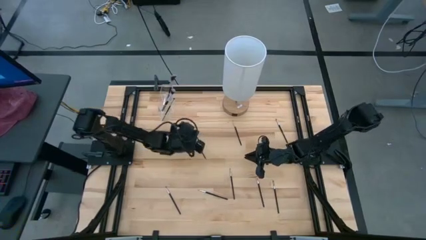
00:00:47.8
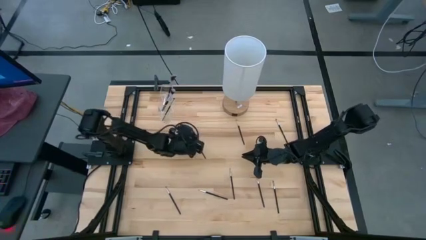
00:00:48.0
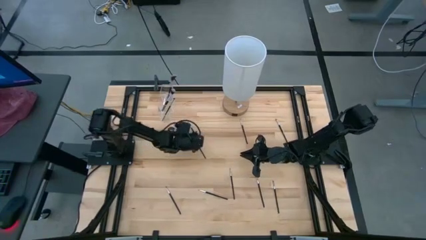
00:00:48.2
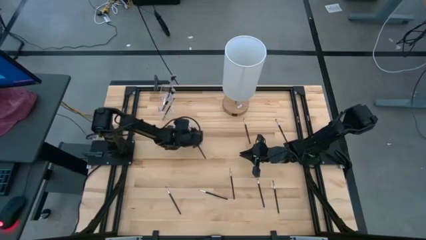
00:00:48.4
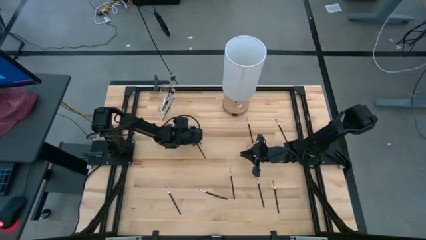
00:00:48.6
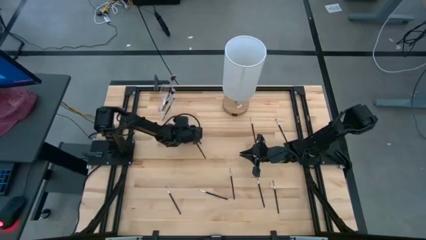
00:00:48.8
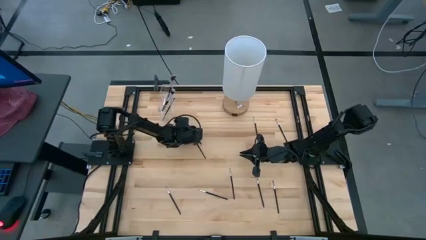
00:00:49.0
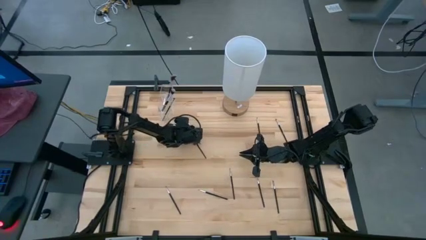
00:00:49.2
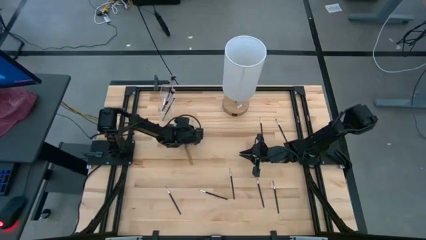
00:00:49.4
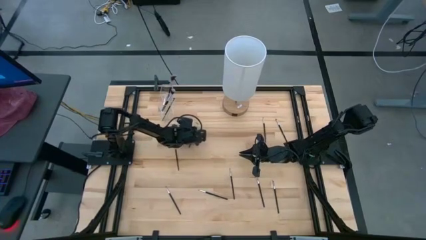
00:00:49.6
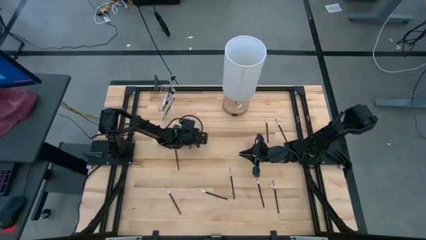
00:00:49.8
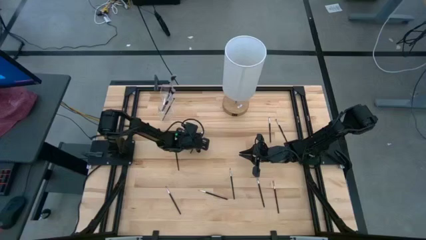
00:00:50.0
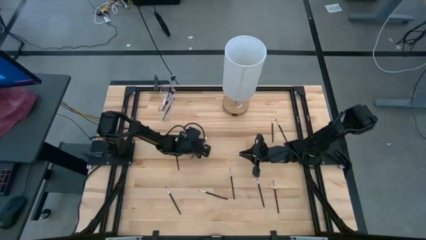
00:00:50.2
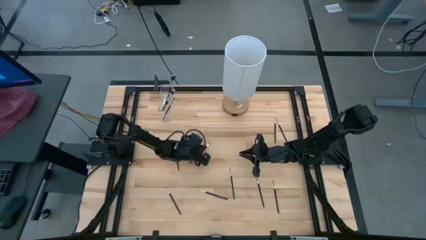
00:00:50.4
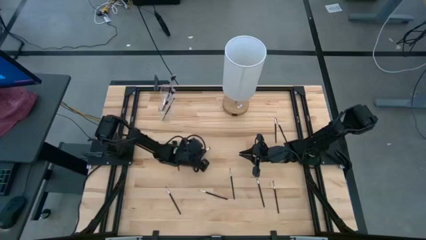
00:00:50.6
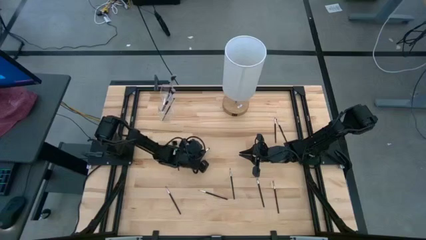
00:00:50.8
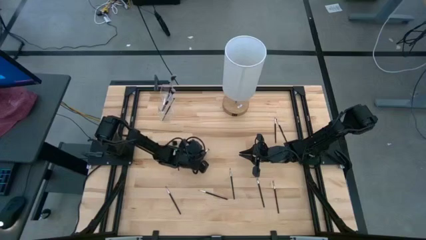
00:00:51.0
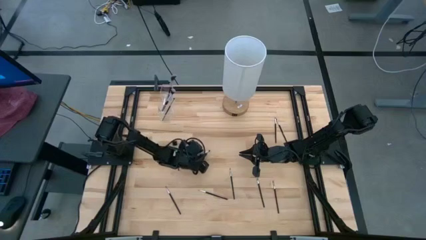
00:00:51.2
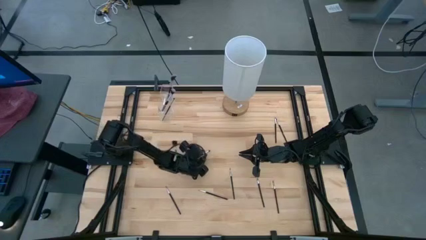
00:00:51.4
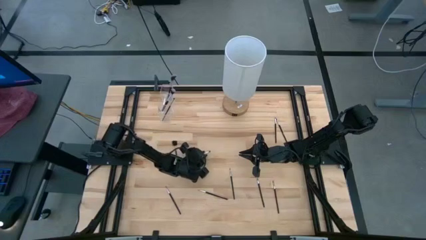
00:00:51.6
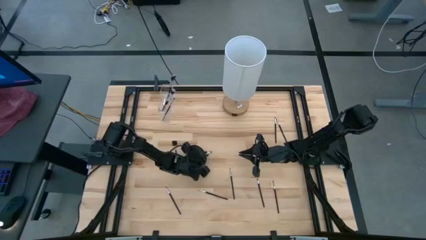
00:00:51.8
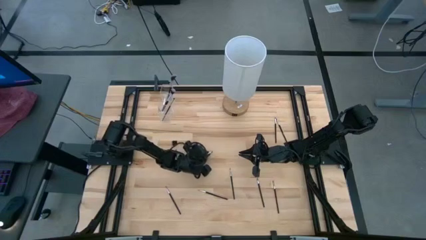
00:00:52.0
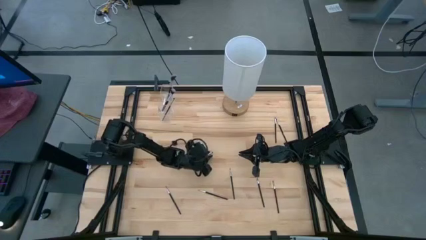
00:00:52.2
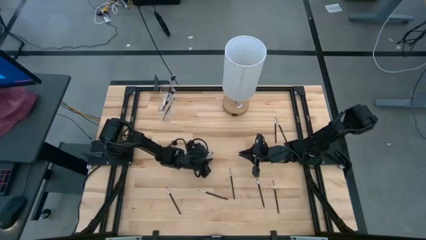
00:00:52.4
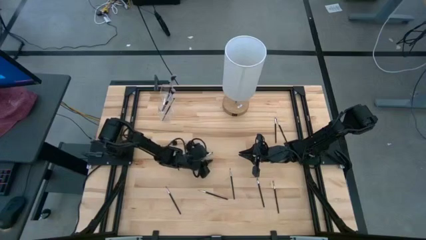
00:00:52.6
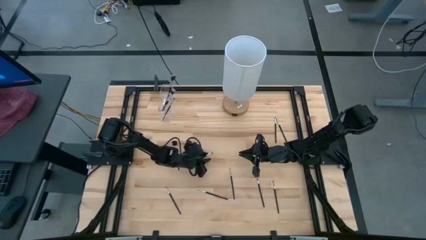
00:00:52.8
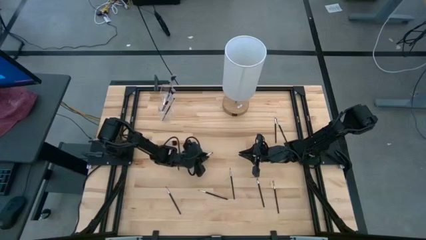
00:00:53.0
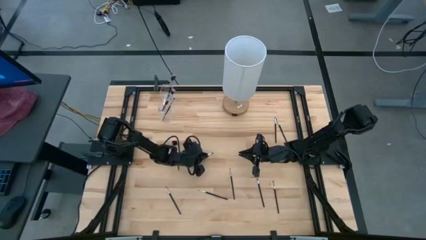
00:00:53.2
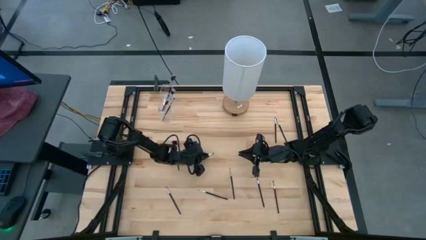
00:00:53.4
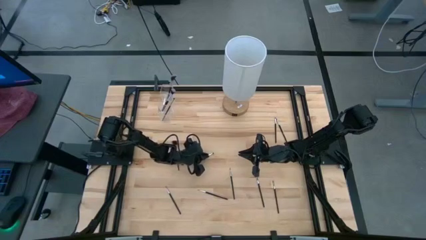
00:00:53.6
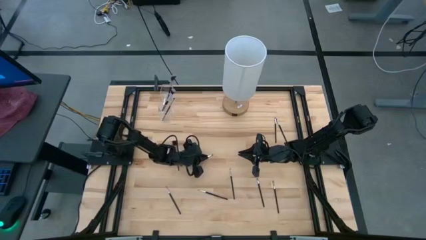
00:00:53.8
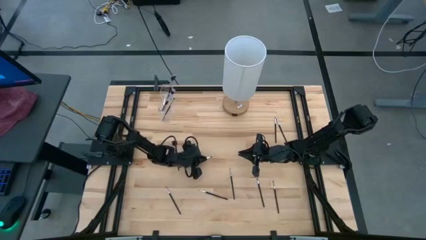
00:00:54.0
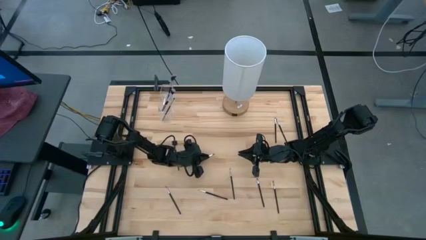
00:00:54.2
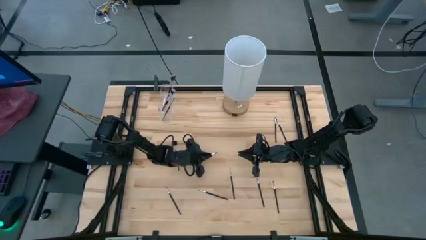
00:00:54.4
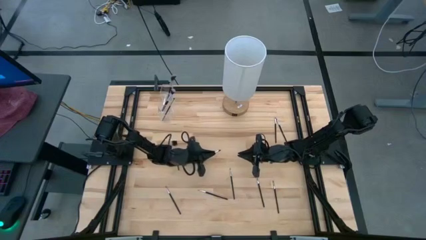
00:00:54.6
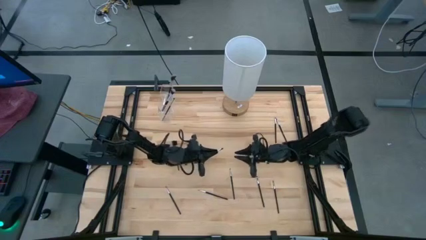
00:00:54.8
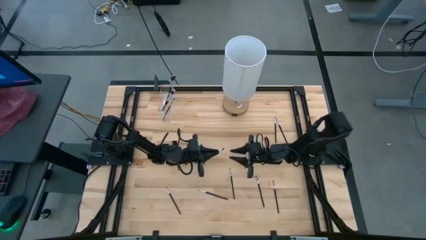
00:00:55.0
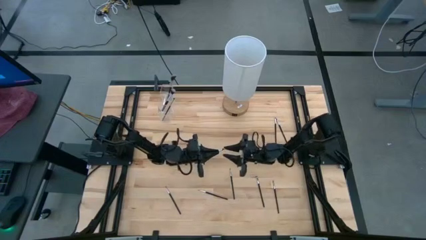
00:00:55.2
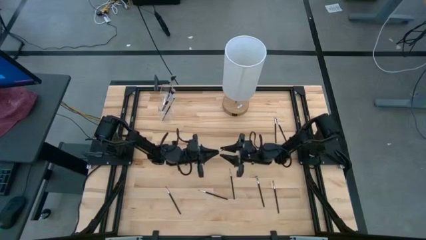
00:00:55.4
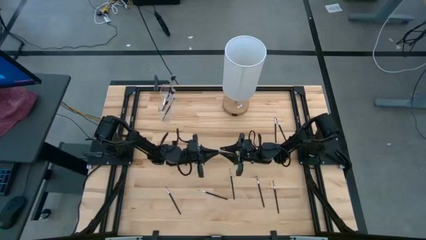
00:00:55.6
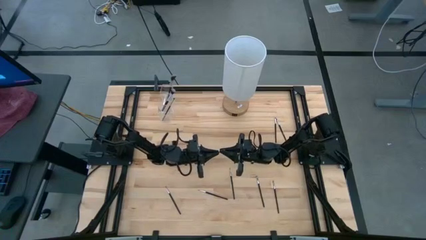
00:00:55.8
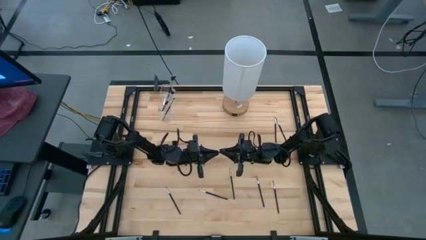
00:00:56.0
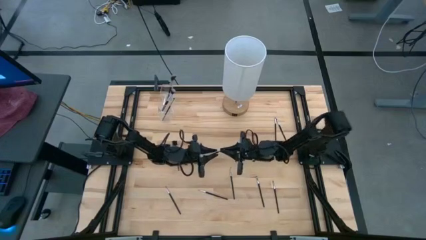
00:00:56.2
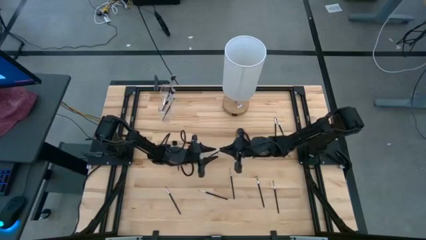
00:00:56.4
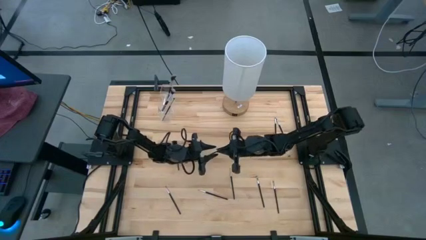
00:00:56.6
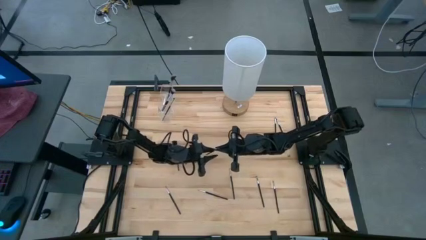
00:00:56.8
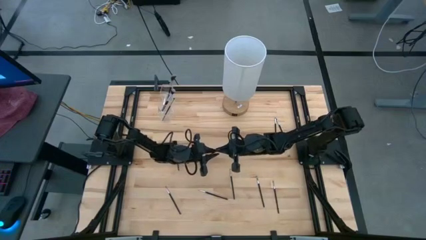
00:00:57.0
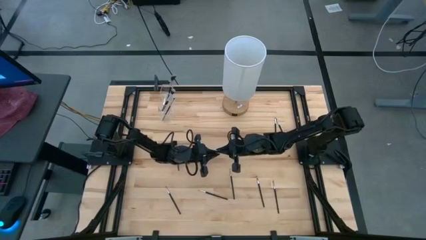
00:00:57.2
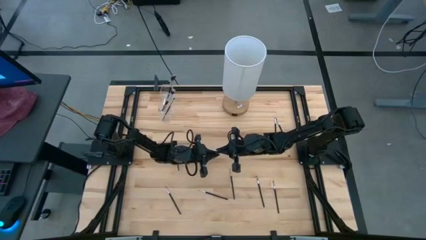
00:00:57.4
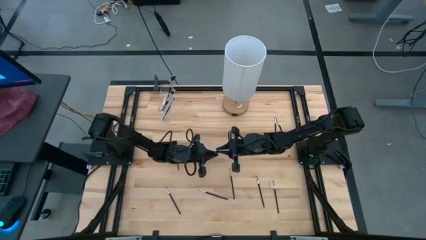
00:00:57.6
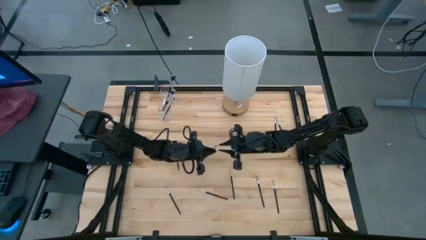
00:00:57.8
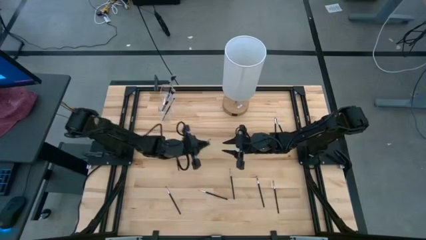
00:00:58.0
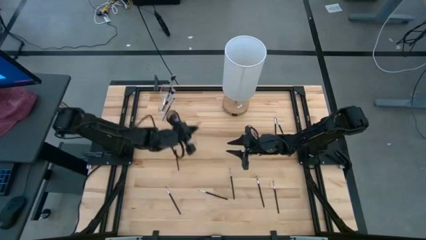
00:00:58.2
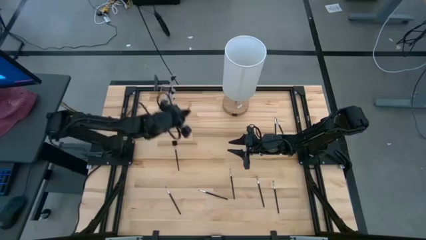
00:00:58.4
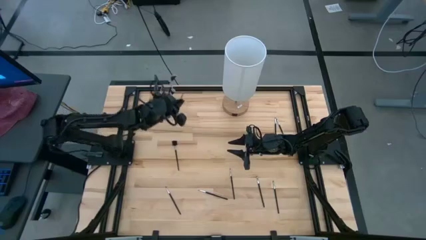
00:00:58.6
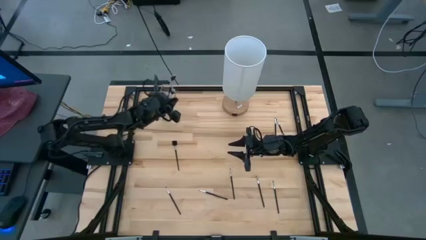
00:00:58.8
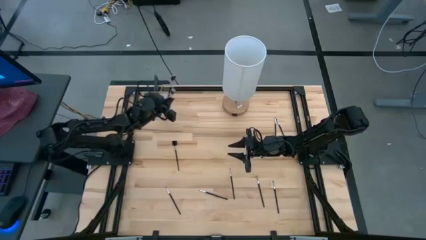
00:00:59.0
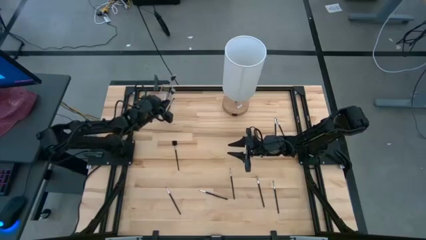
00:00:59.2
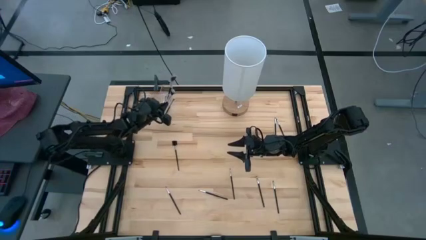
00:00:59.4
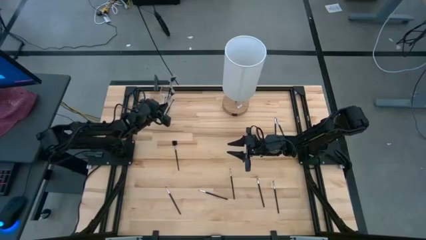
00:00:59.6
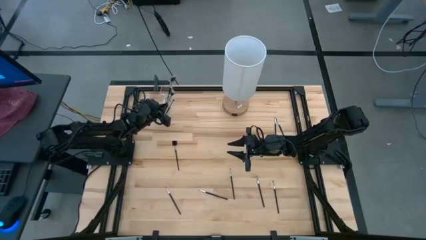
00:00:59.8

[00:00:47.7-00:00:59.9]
Task: Put items in baskets/containers
Put the black eyeshadow brush into the transparent organizer

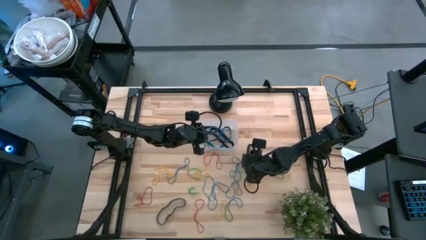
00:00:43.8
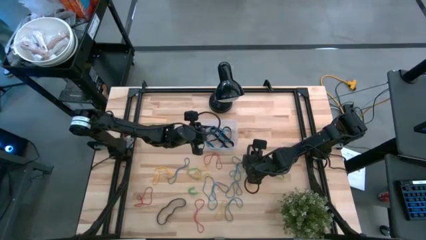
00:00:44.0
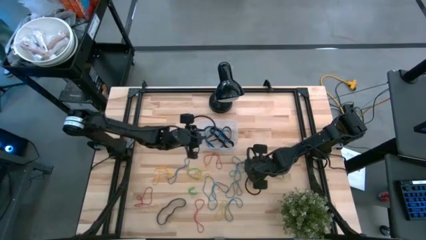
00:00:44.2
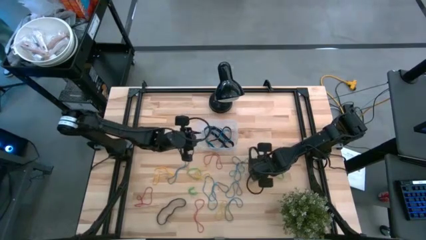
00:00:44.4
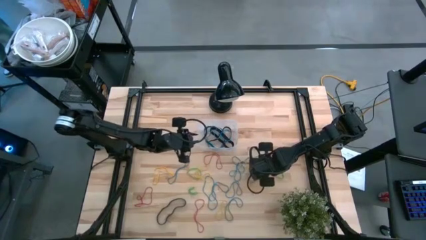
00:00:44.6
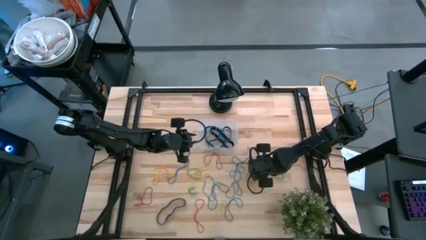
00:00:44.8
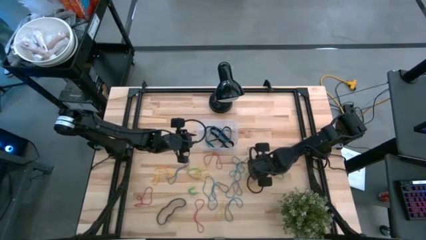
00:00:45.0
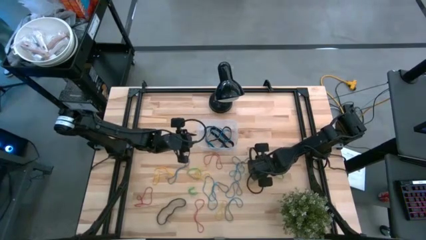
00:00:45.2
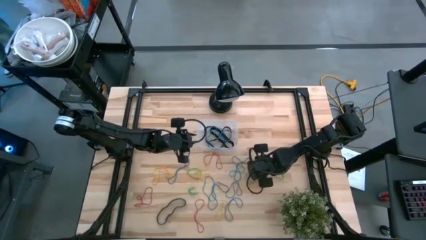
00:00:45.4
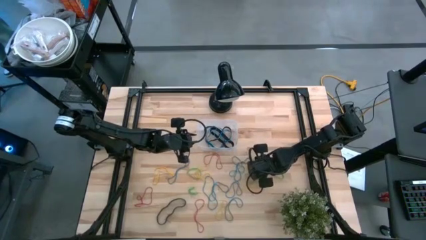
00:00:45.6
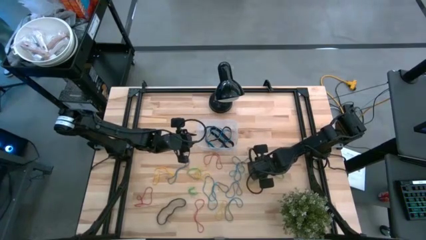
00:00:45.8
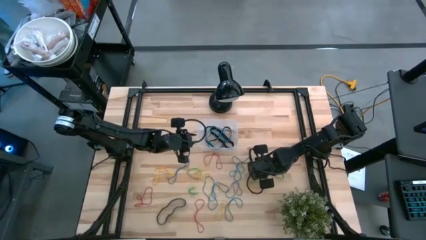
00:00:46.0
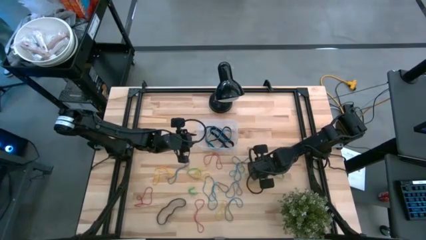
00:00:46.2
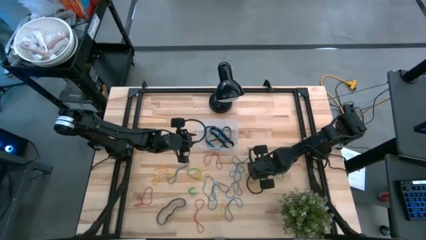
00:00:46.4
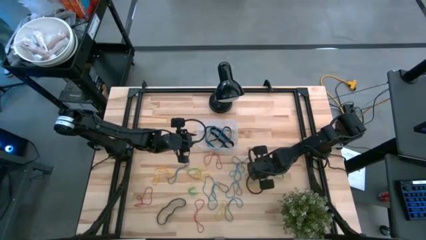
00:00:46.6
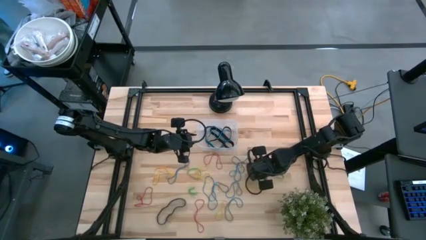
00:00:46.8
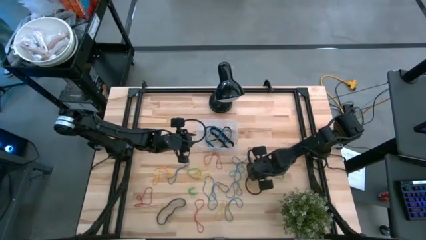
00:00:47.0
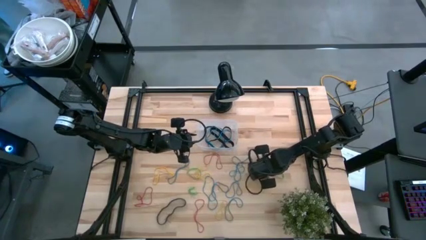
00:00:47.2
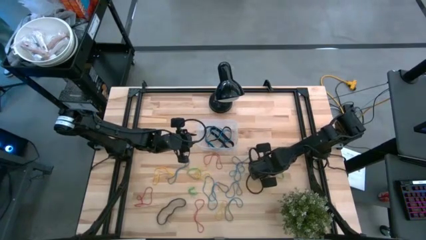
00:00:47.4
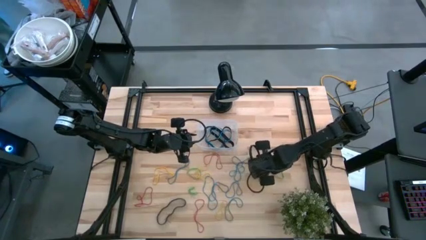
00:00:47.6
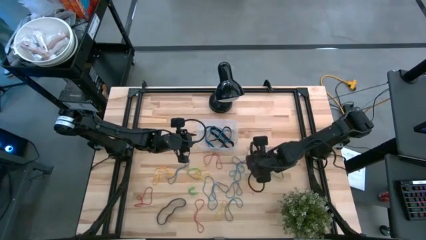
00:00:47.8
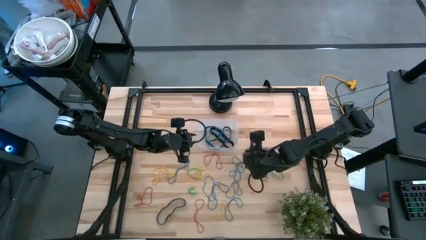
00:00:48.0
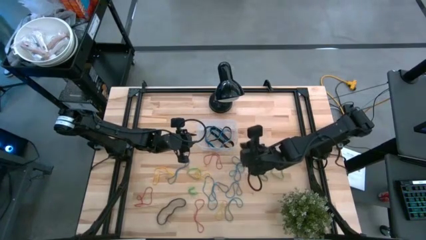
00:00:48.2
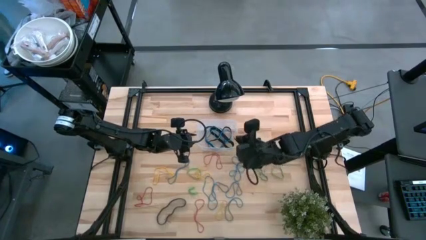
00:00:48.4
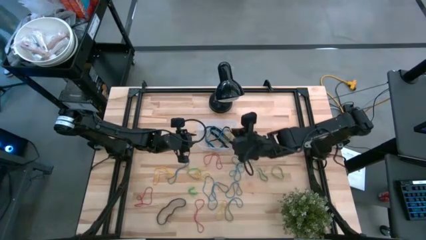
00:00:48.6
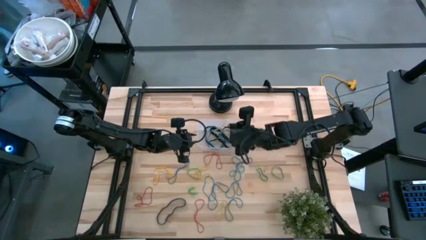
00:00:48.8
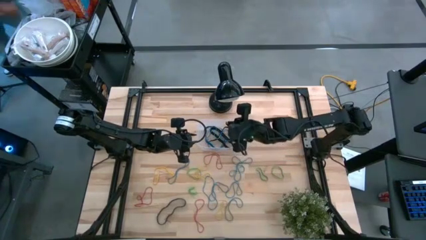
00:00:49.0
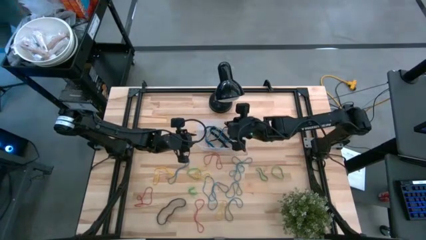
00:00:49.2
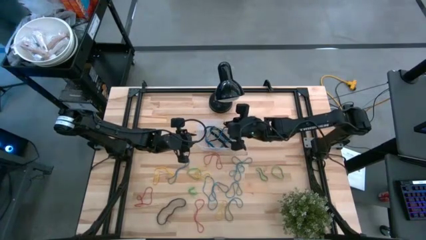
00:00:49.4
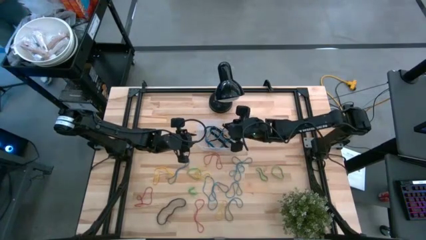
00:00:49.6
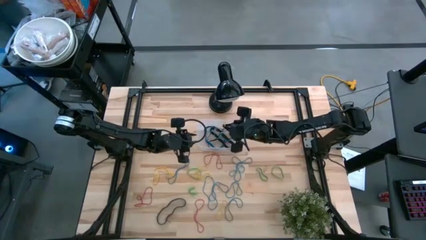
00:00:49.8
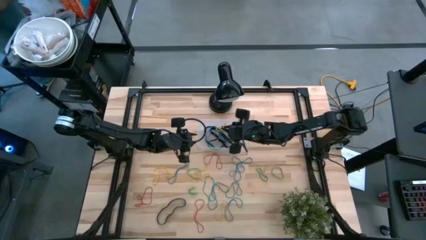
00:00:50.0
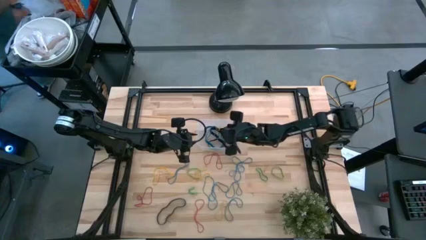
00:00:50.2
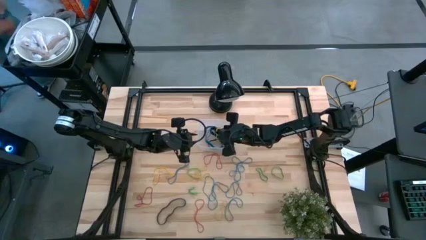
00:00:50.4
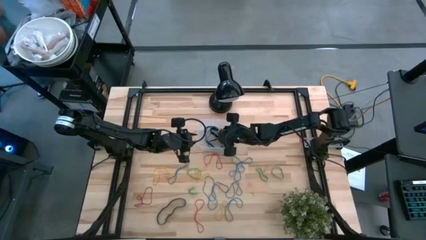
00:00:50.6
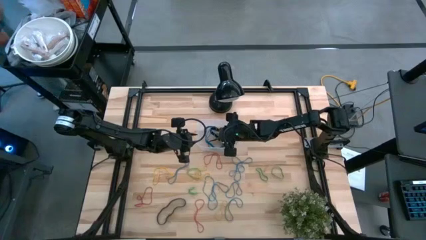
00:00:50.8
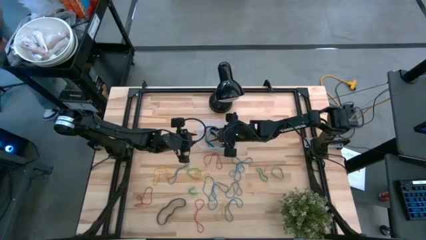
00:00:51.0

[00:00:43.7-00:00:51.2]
Task: Pick and place rubber bands into bin
Put the yellow rubber band into the transparent bin
